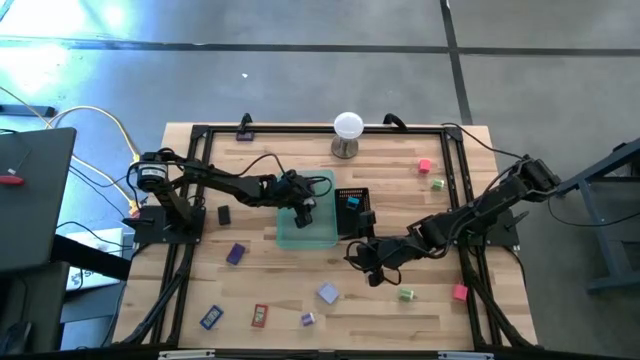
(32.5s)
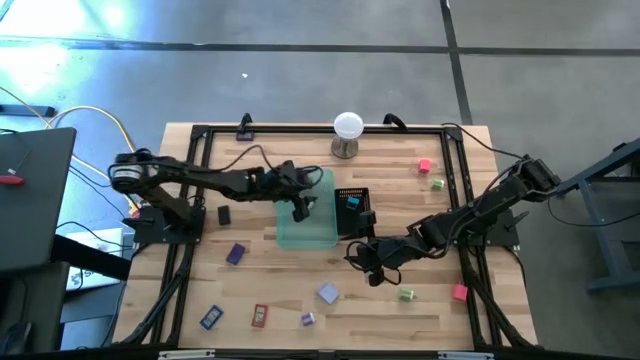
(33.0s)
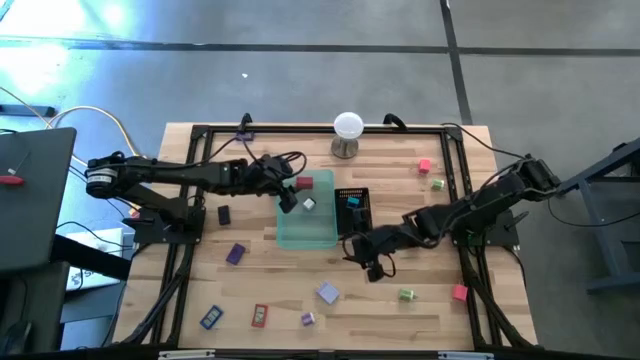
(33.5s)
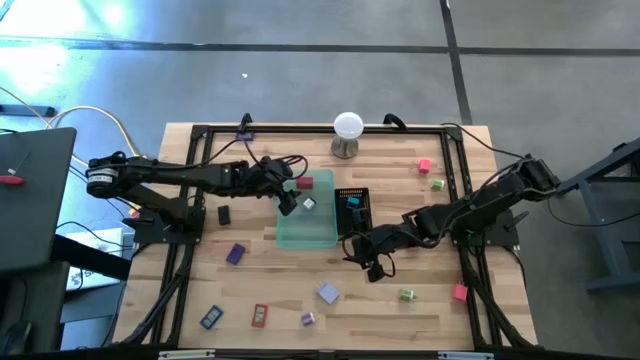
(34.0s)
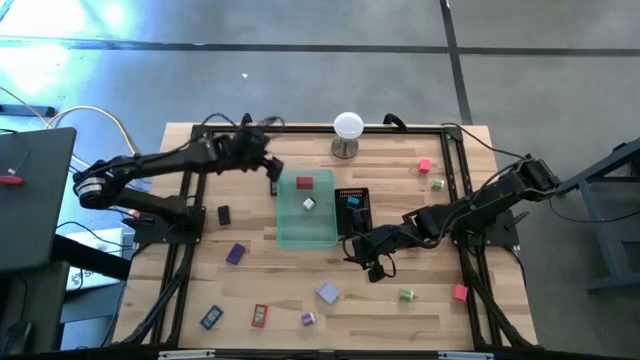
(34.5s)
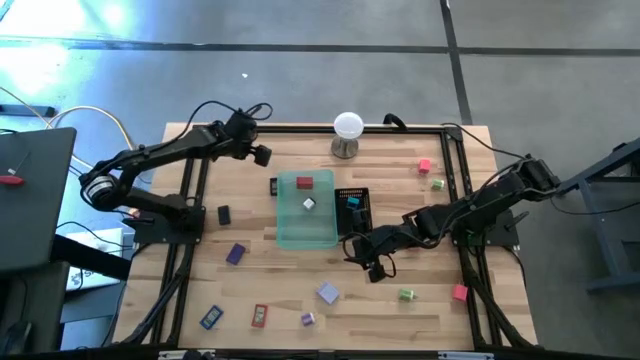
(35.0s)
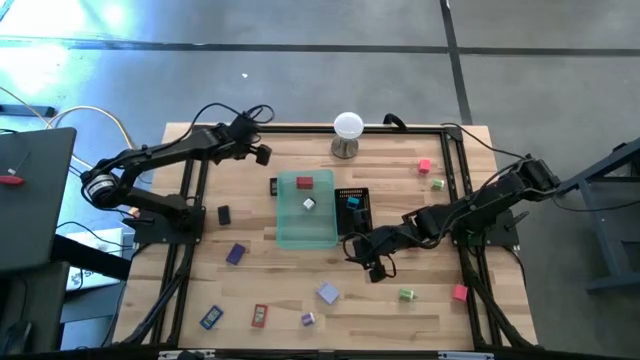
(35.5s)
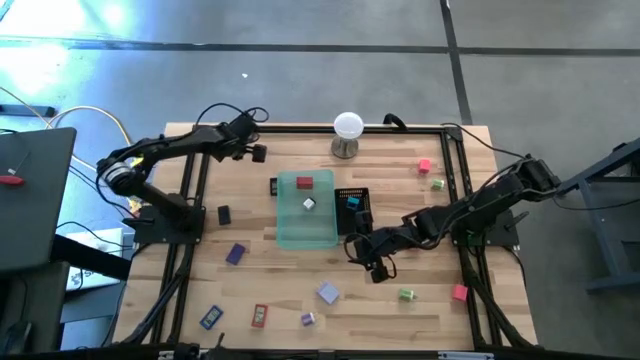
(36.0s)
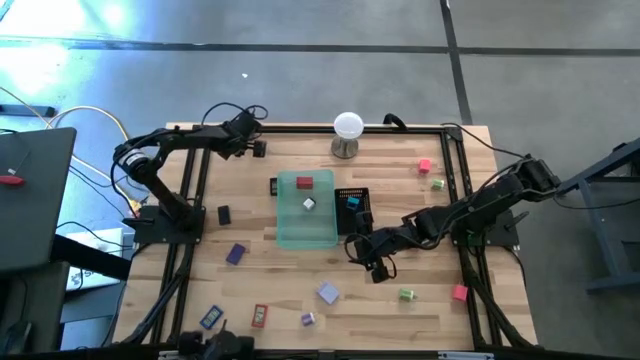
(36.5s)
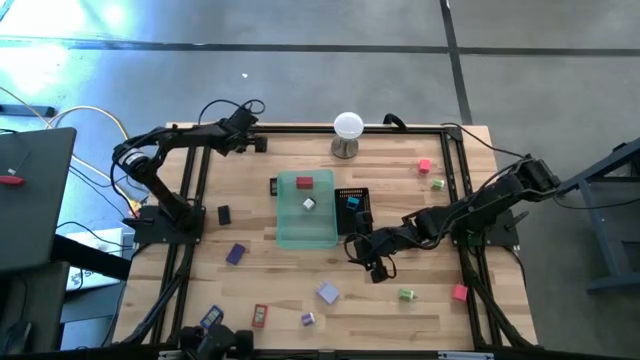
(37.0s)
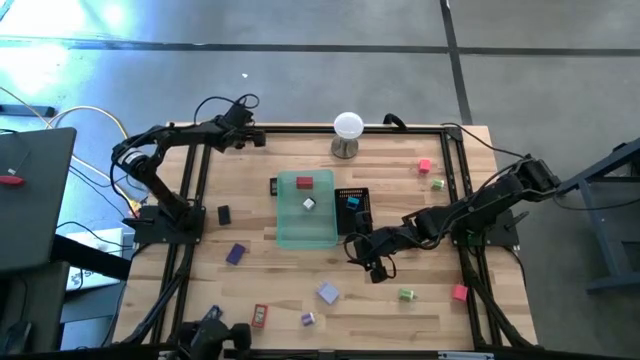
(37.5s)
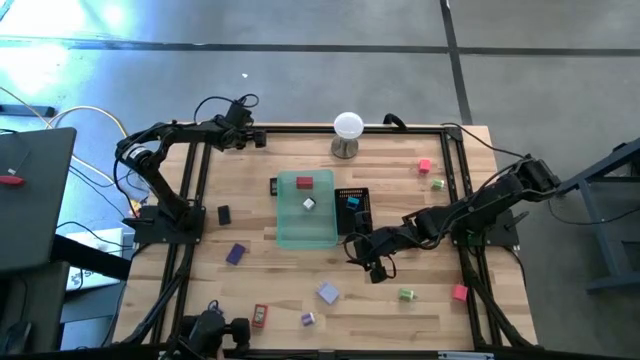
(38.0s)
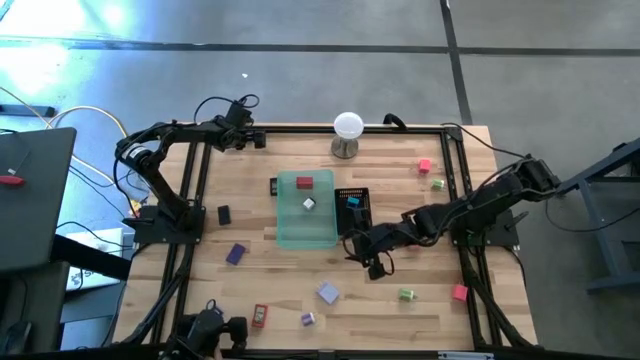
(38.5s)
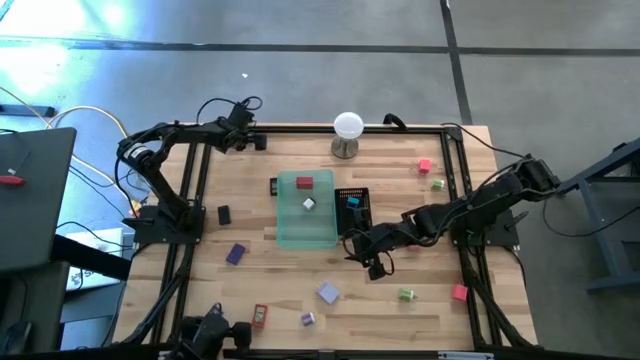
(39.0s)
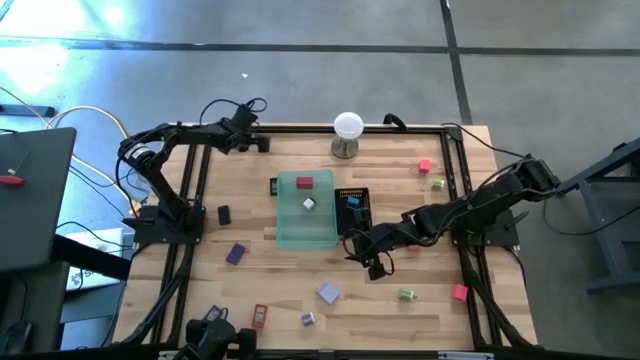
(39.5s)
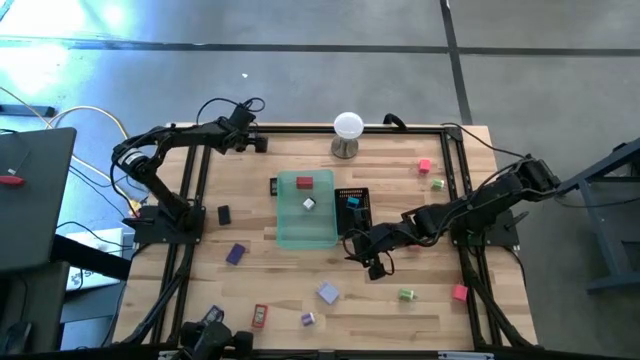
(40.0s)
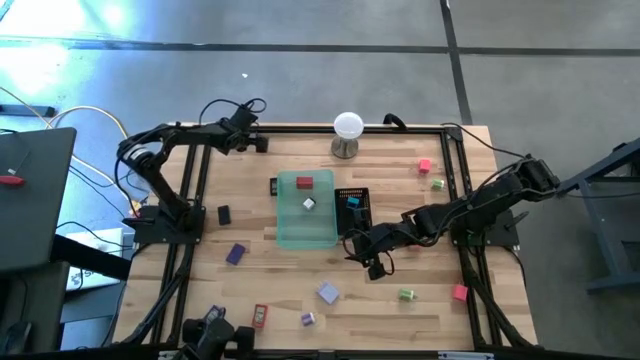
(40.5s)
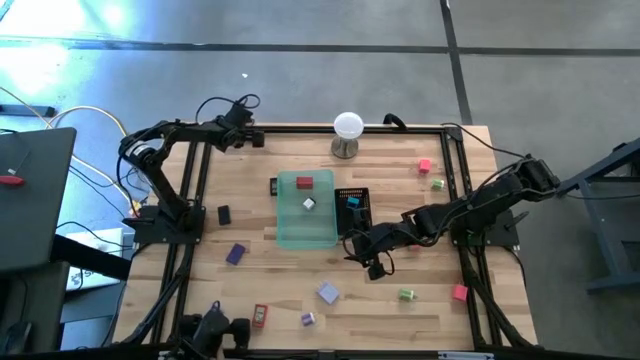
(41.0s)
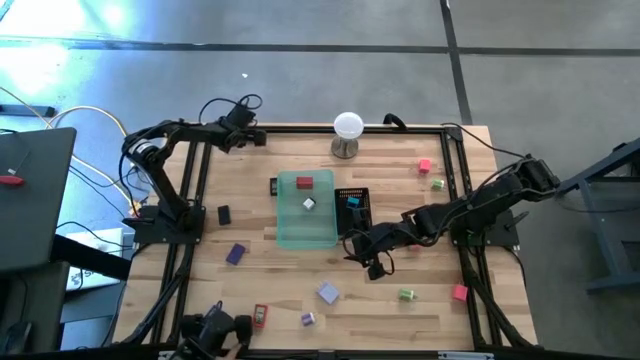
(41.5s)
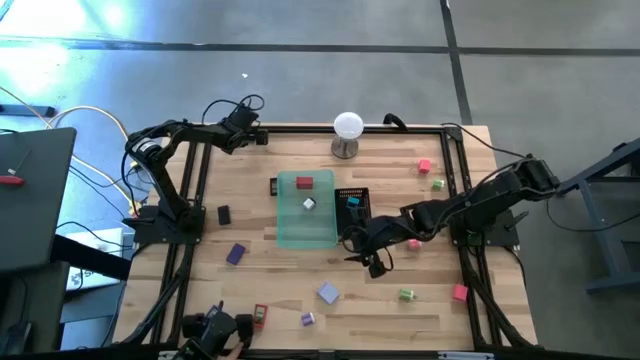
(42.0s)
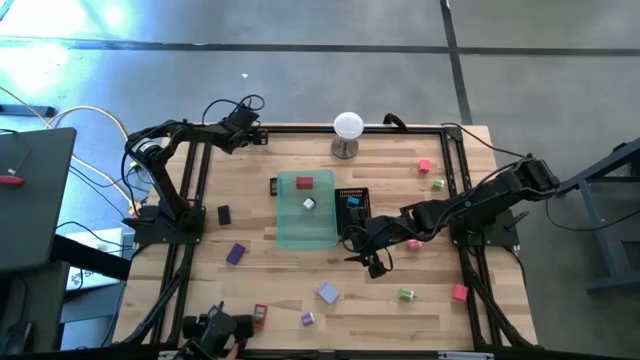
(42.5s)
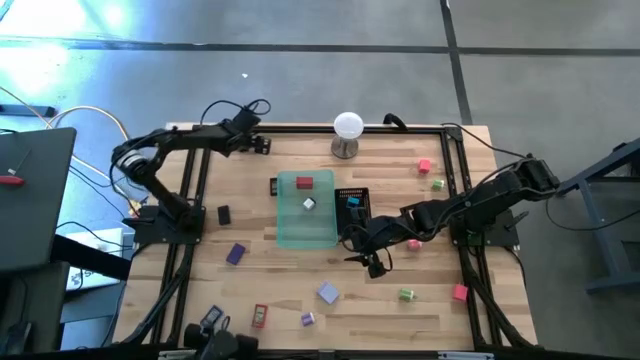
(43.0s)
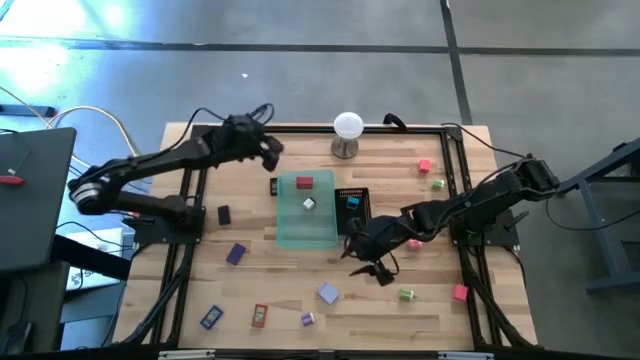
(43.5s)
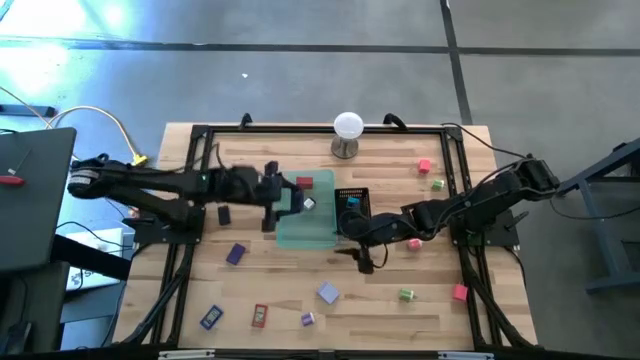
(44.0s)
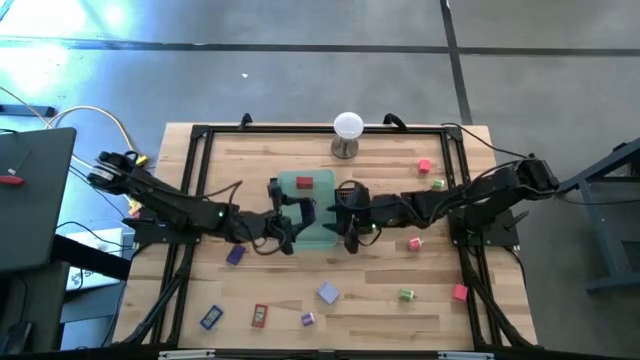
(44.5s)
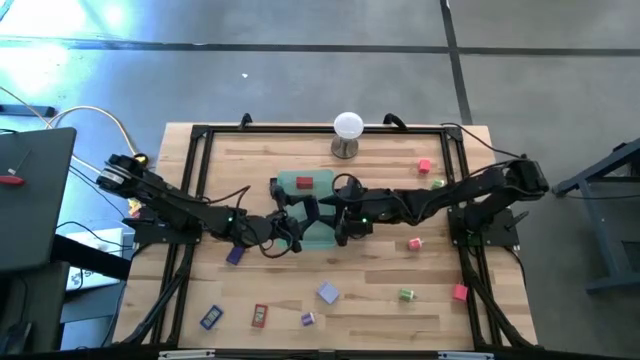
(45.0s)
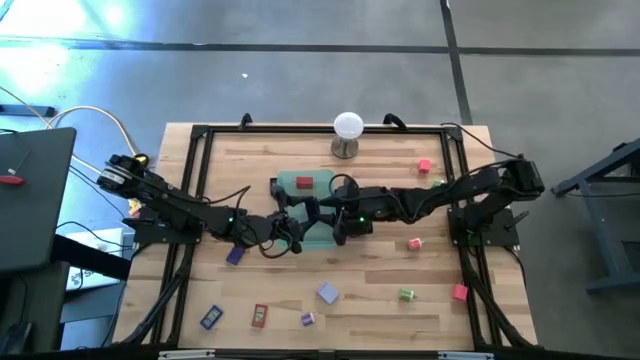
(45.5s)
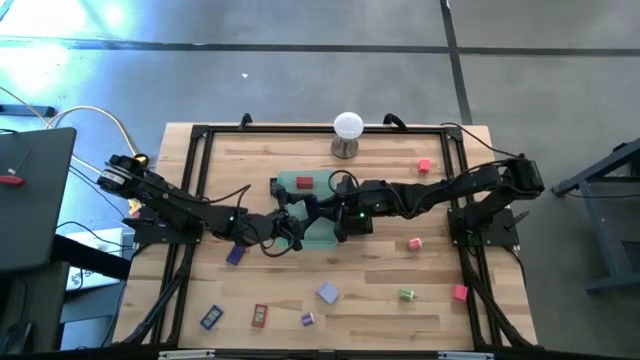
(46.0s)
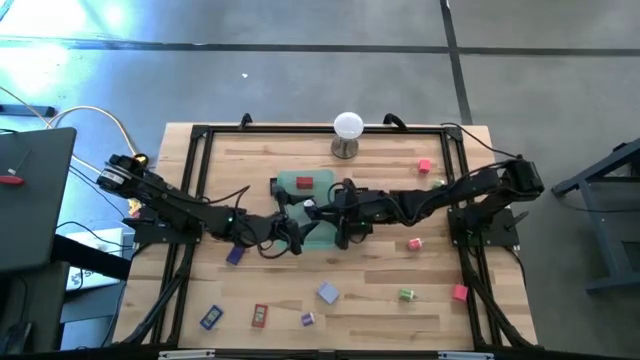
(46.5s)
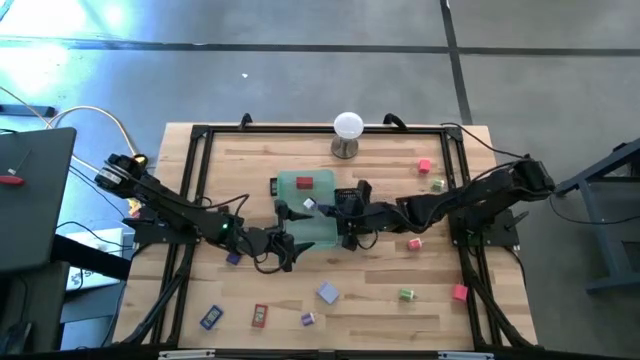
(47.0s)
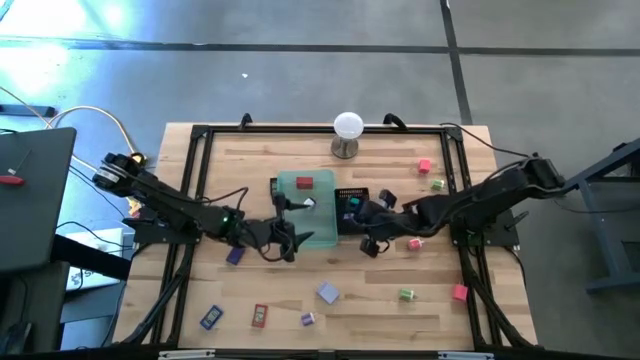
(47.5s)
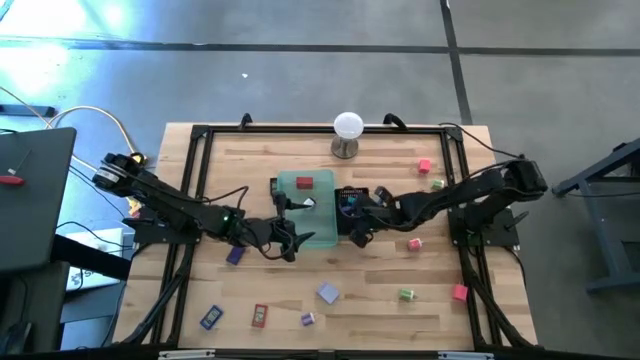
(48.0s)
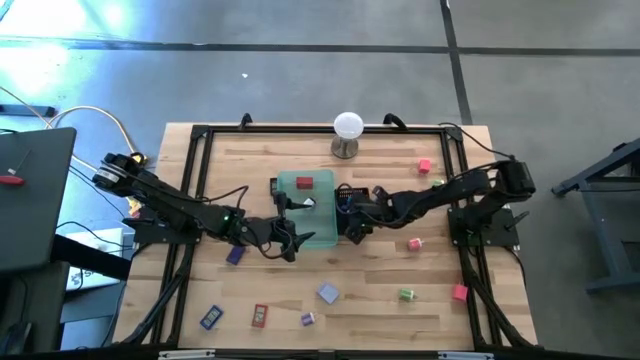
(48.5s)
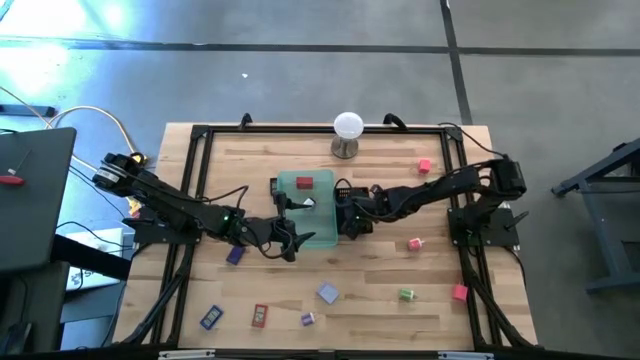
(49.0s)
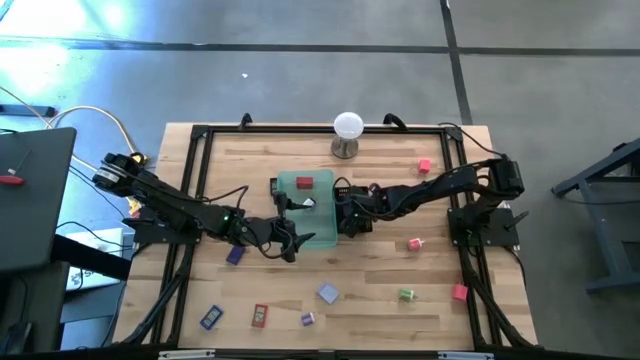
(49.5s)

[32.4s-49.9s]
Task: Pick & Place Office items
Put the violet digital clock into the black bin

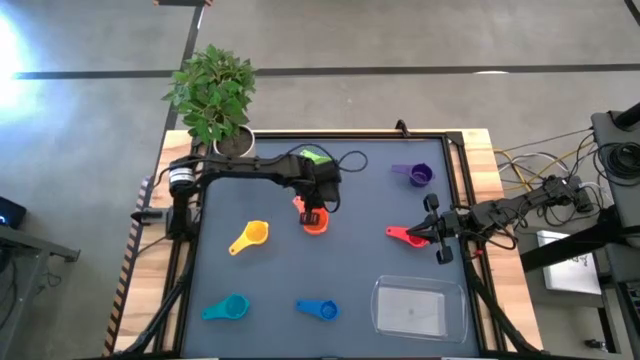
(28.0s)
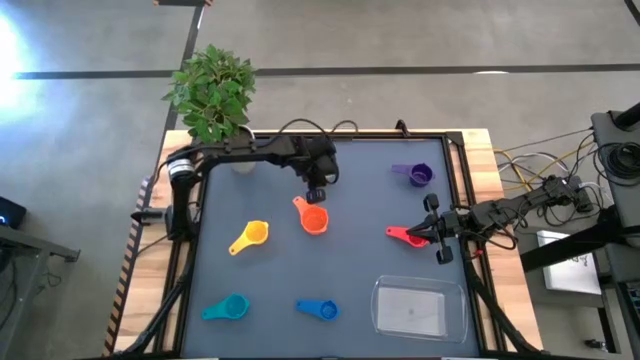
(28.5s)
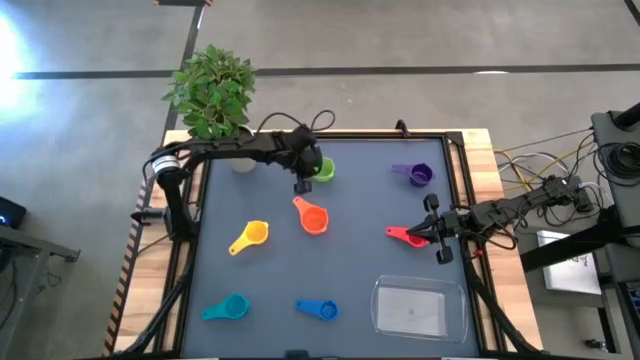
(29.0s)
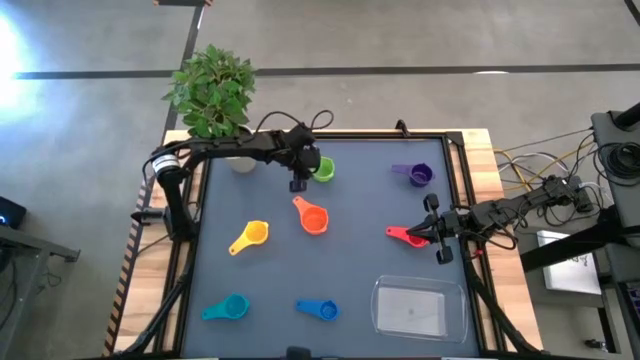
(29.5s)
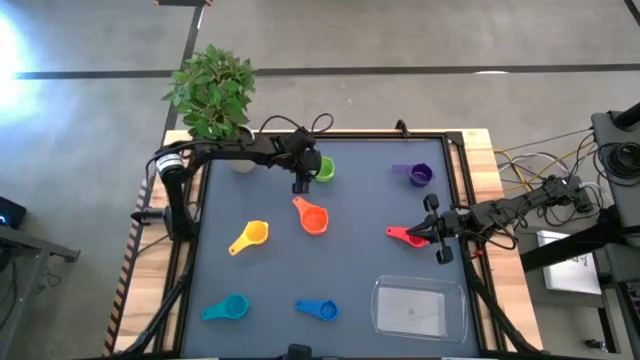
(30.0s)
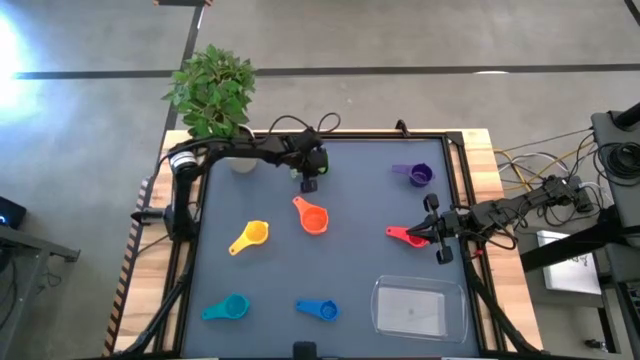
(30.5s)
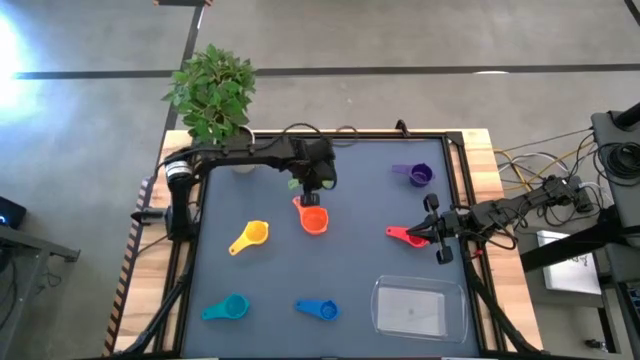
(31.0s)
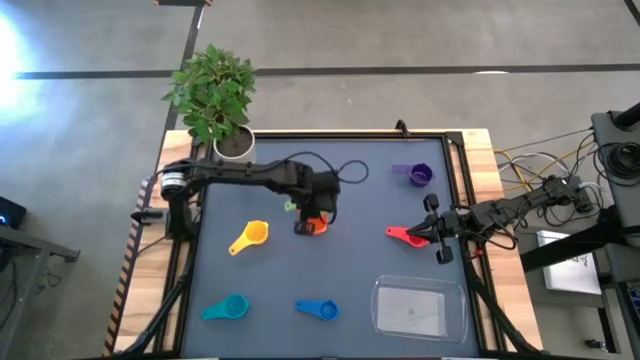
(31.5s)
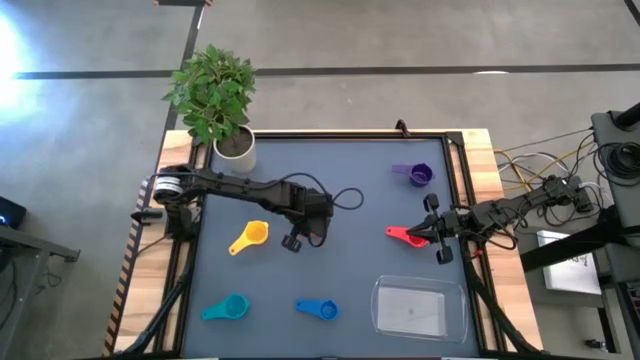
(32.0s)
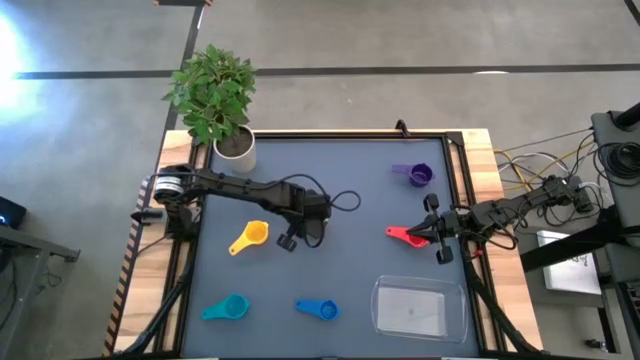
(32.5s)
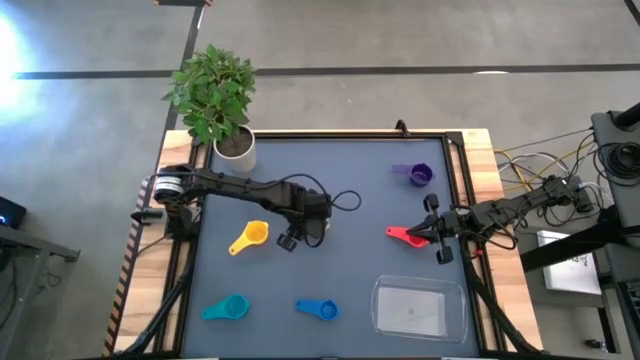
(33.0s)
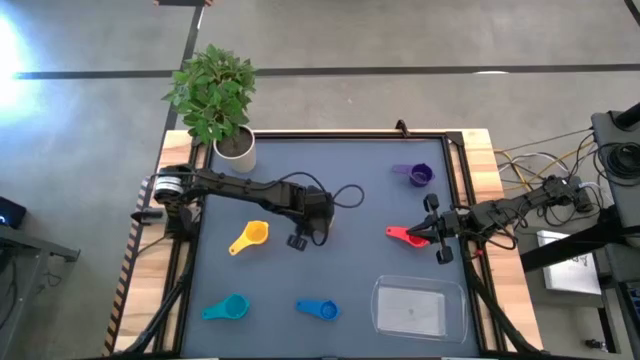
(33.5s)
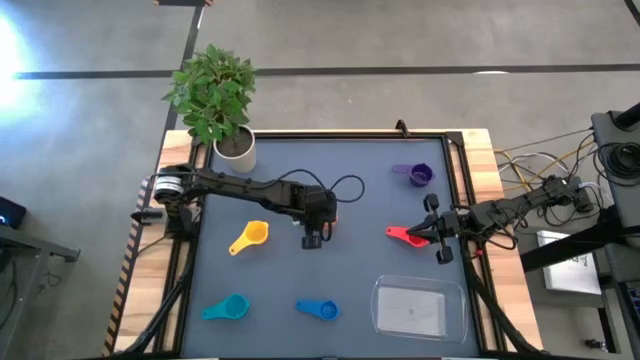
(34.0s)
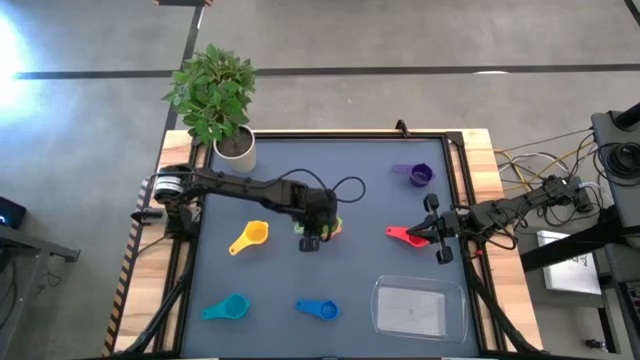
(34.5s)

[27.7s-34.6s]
Task: Nest measuring cups in basket
Stack the green measuring cup on top of the orange measuring cup
